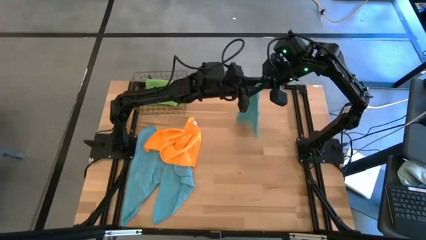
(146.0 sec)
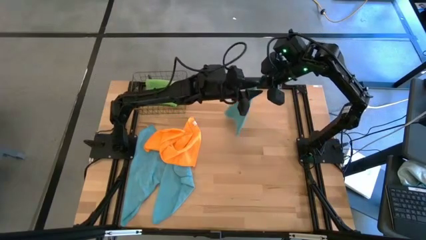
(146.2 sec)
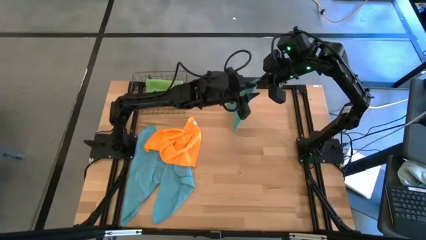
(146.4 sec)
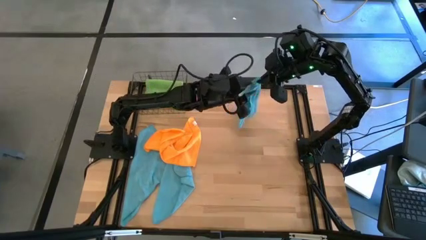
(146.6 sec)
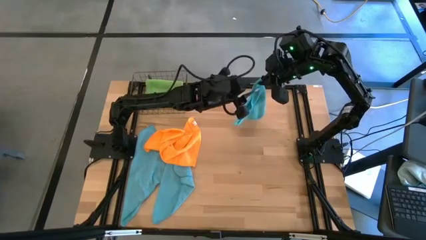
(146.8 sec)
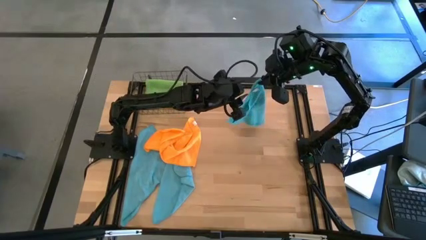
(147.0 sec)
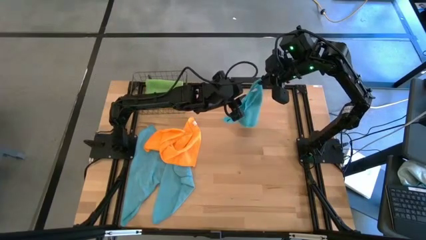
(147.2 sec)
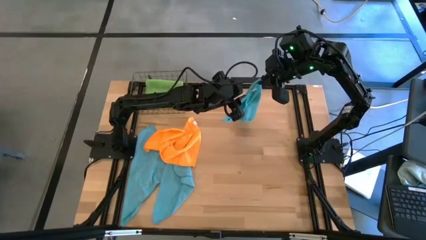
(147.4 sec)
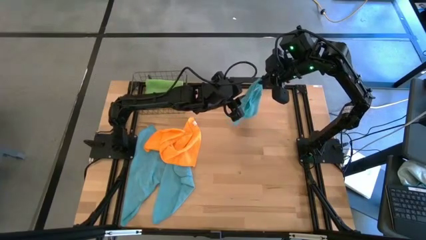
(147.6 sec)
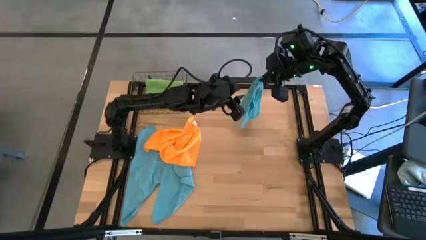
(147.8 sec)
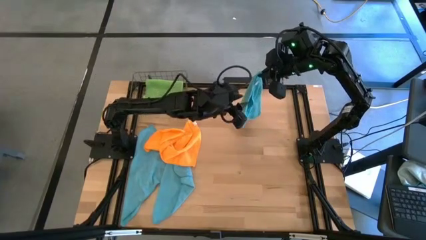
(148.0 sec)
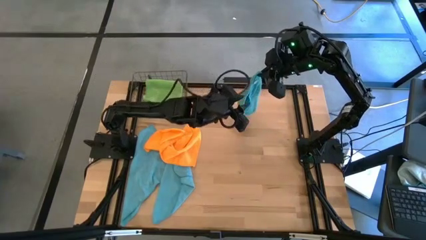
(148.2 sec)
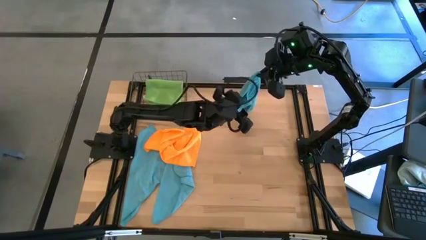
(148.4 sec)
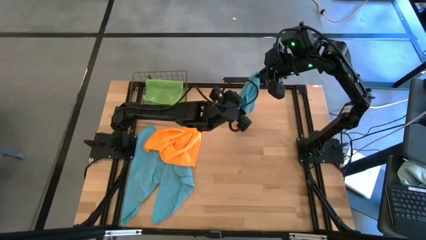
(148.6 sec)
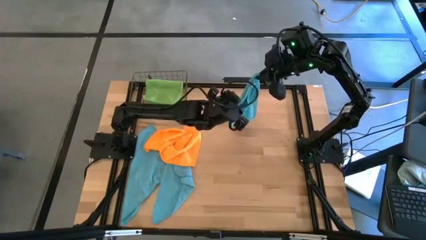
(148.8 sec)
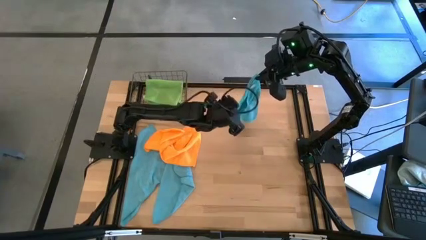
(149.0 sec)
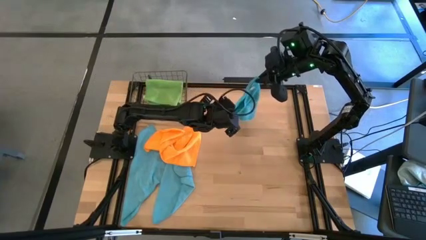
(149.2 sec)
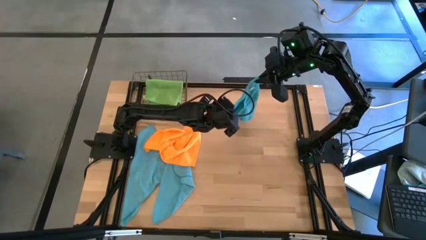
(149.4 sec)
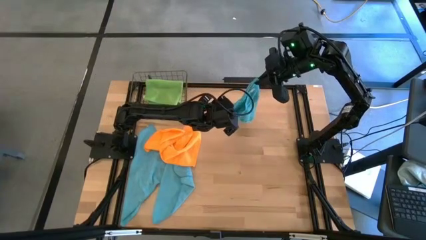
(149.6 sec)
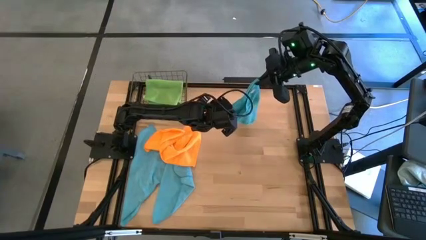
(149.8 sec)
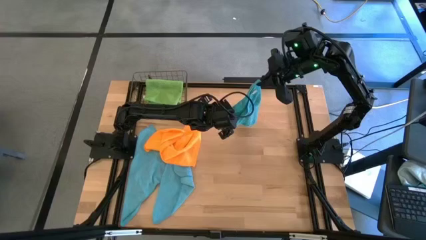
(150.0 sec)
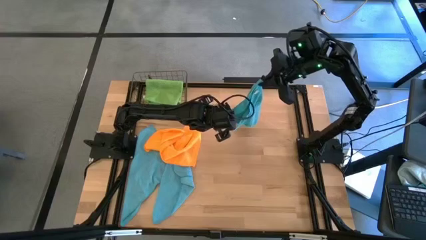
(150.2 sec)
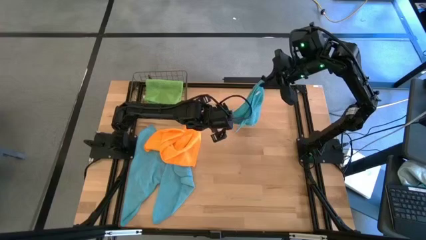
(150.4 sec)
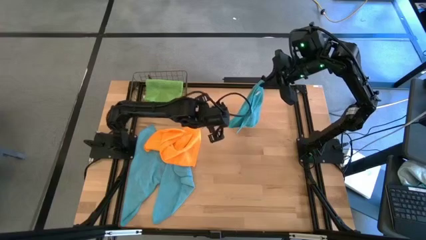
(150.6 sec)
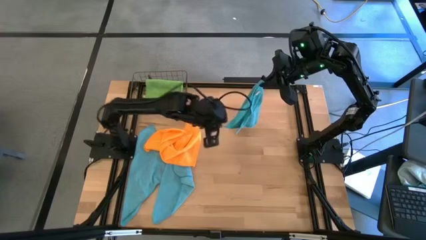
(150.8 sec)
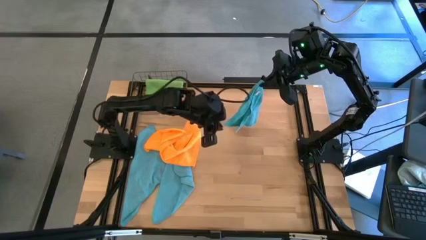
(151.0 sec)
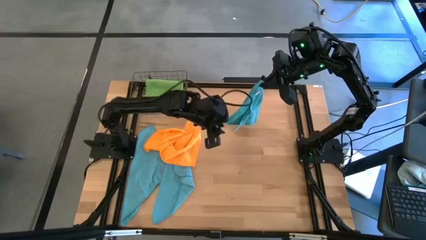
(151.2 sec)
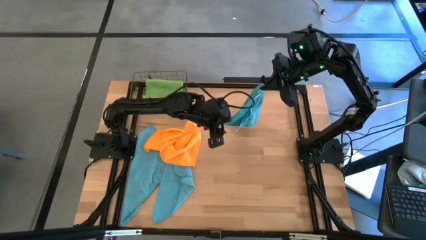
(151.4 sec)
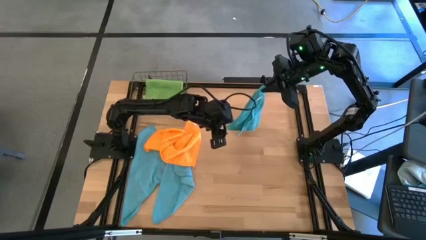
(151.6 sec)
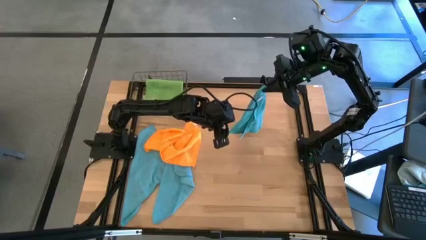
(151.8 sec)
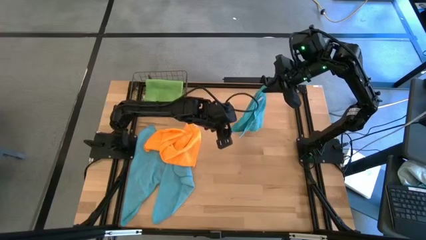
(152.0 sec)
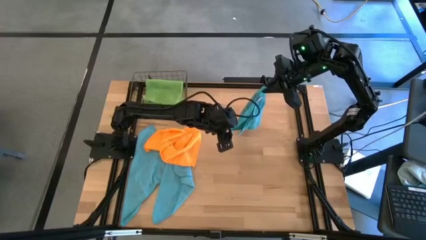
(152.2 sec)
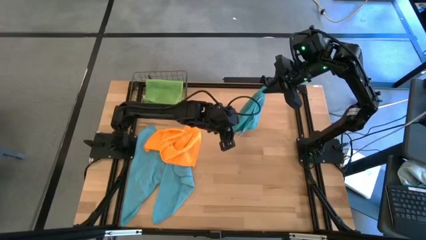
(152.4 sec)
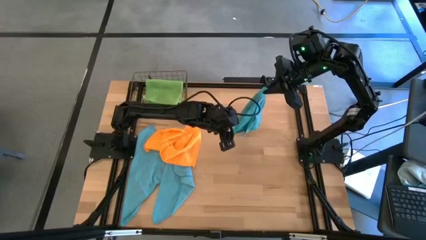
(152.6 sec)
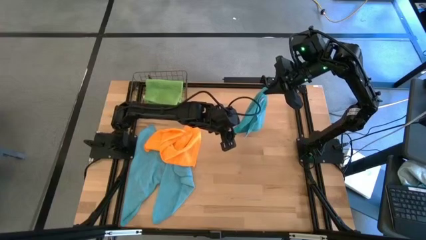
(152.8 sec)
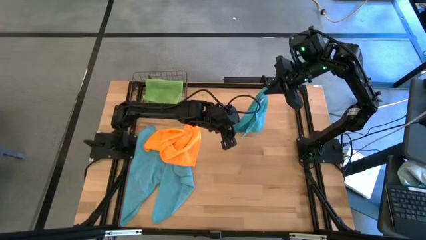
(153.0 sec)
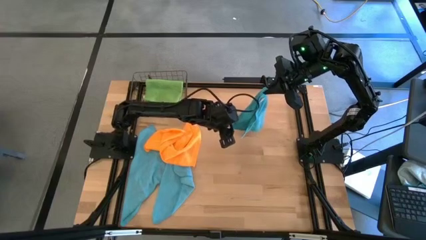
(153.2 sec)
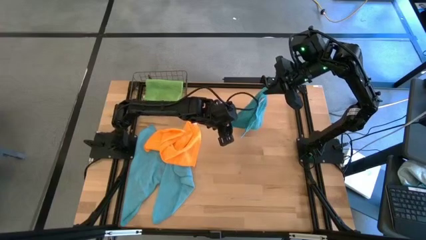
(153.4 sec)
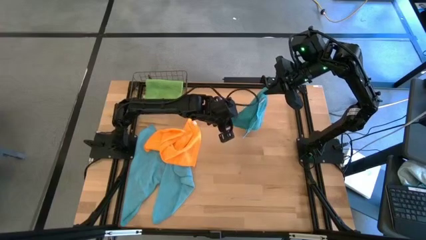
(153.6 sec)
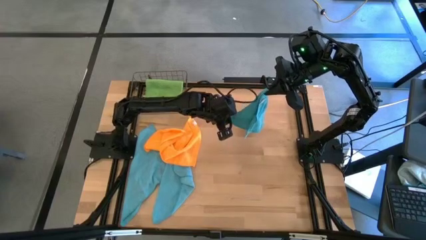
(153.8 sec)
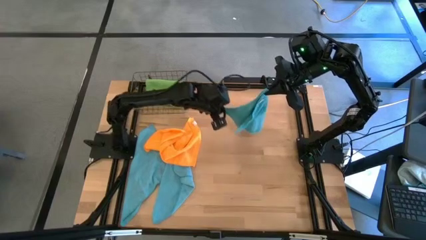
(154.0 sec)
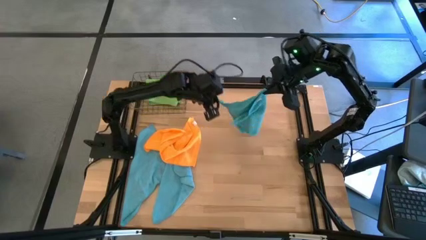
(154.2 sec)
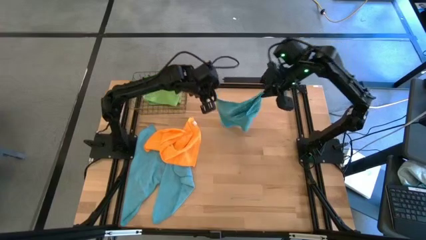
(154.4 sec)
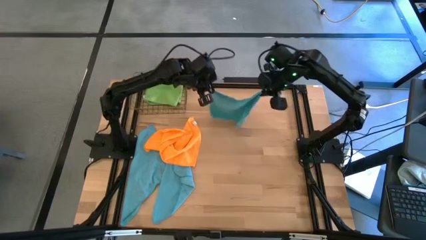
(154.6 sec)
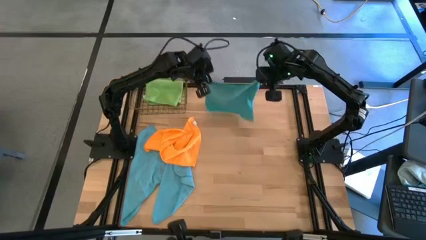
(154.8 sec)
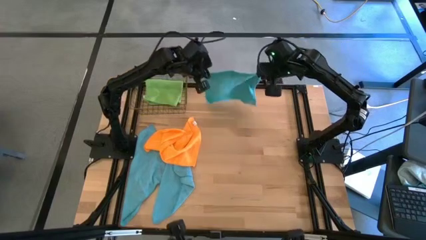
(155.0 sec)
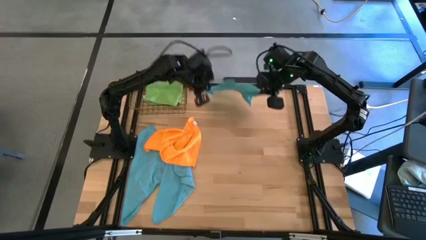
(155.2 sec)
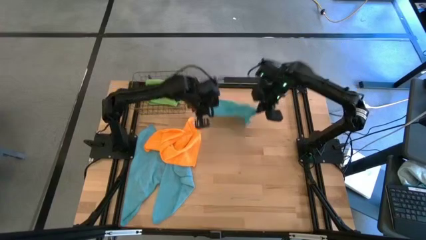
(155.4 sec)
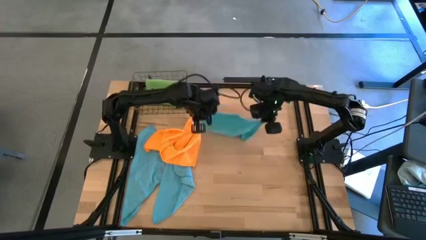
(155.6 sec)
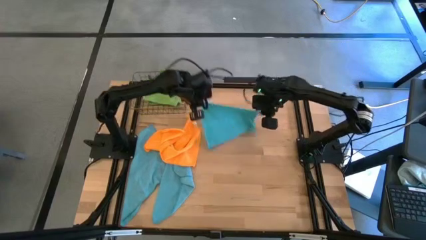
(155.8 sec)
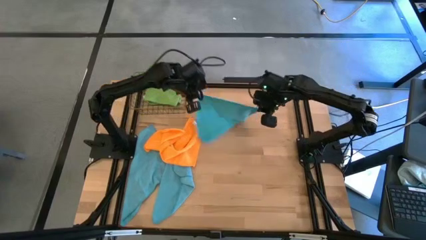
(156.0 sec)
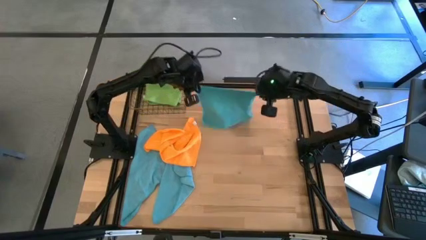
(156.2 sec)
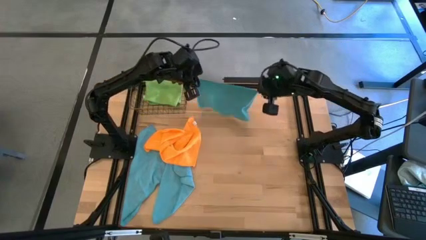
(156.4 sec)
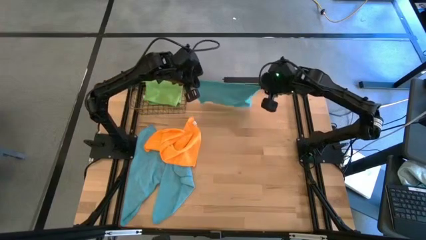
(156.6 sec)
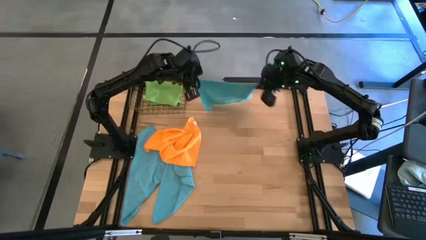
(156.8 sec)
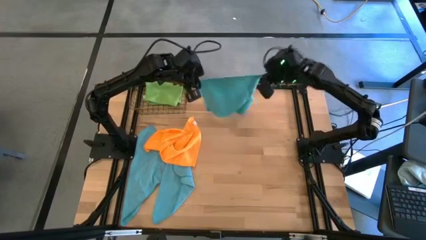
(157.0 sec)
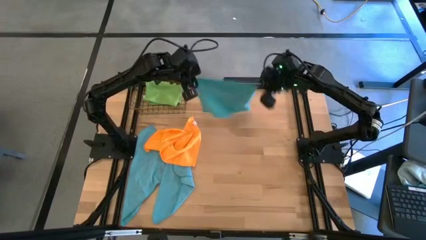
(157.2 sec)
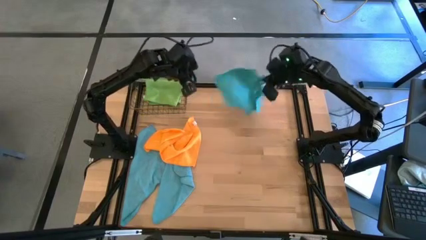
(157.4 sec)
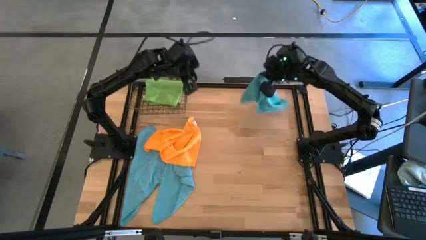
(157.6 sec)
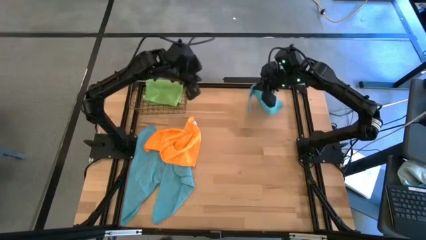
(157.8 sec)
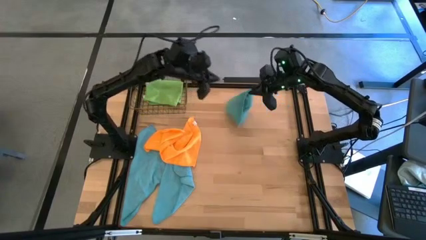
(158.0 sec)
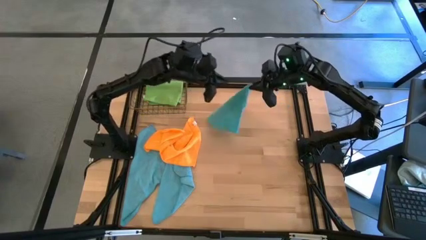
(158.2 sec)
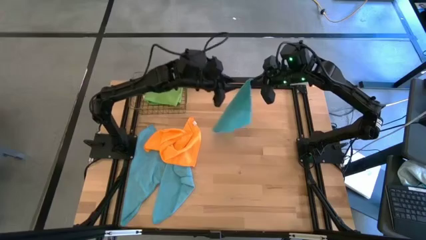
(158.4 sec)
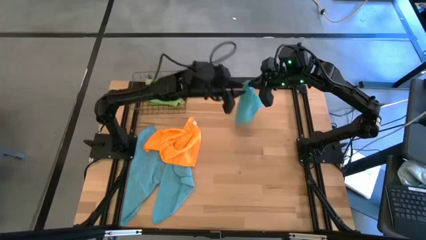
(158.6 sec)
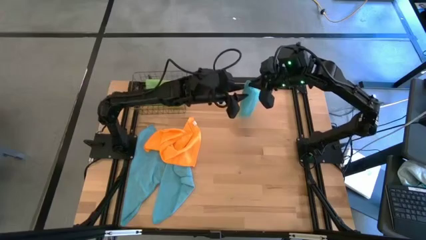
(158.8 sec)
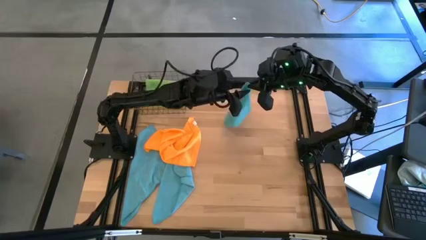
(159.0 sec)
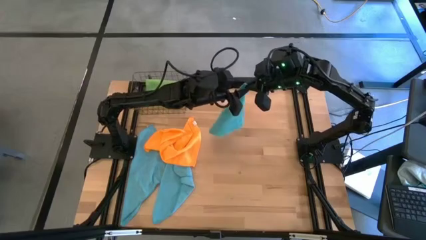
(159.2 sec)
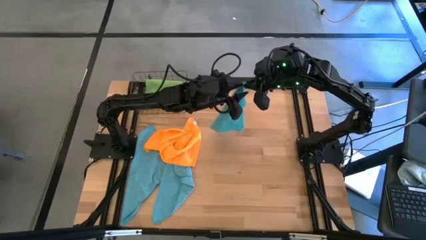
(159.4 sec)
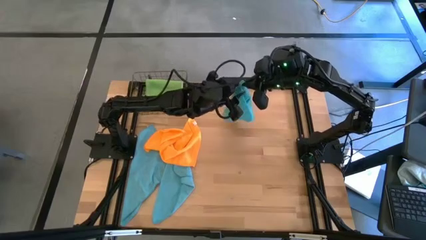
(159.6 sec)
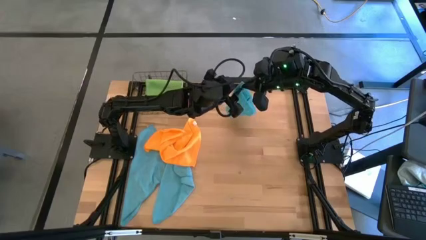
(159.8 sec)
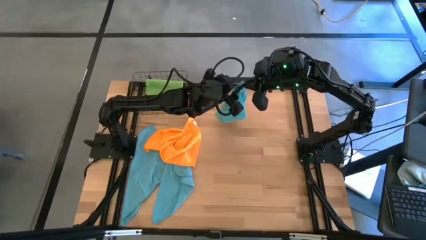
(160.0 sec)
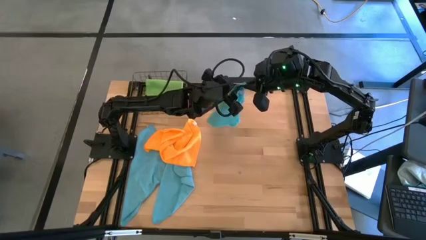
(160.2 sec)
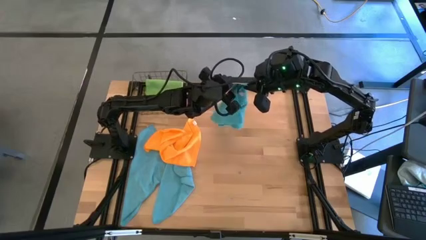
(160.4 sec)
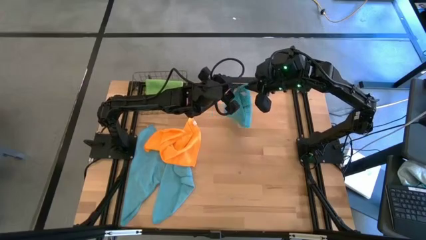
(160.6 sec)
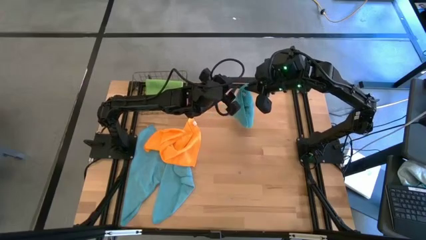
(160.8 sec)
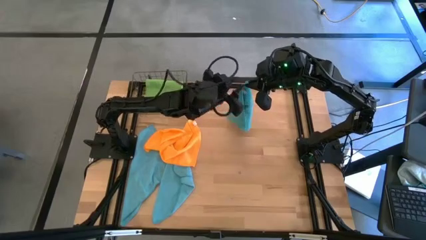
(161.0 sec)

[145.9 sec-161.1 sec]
Task: Fold microfiber towels
Fold the blue microfiber cloth

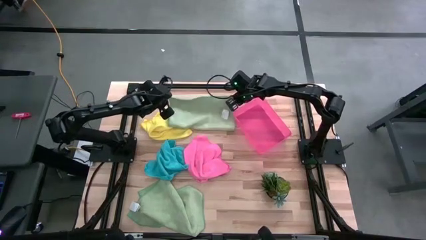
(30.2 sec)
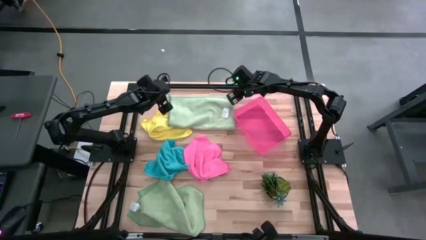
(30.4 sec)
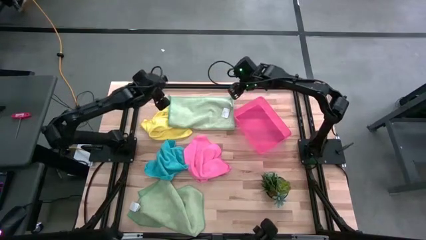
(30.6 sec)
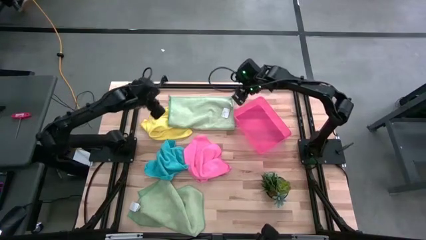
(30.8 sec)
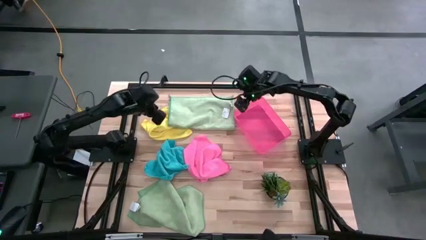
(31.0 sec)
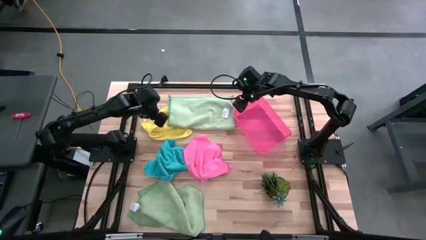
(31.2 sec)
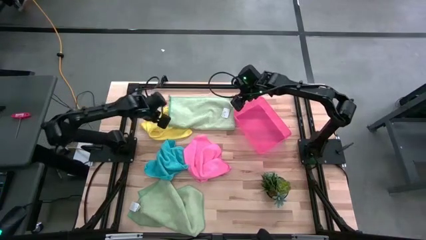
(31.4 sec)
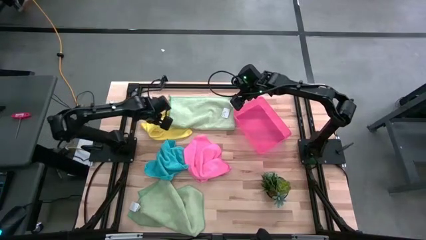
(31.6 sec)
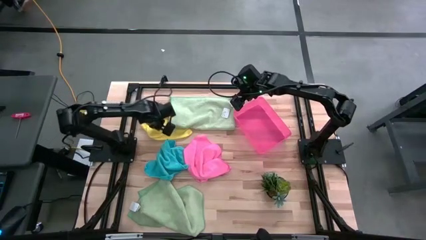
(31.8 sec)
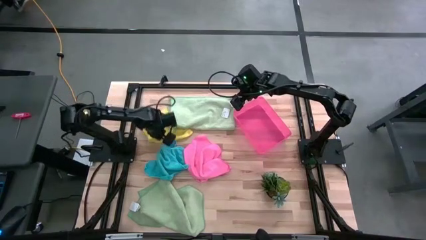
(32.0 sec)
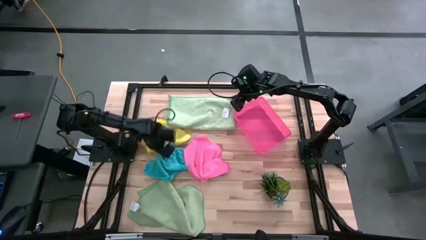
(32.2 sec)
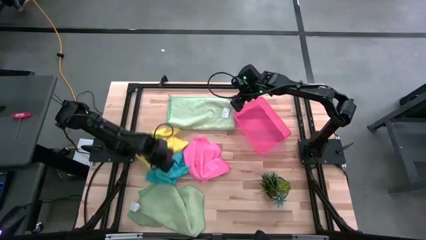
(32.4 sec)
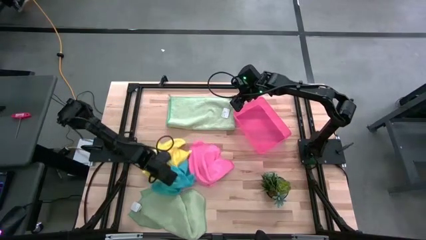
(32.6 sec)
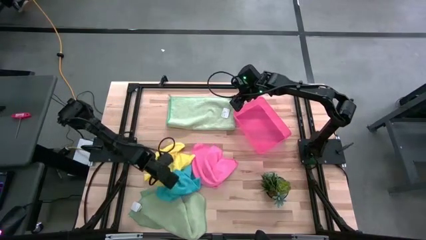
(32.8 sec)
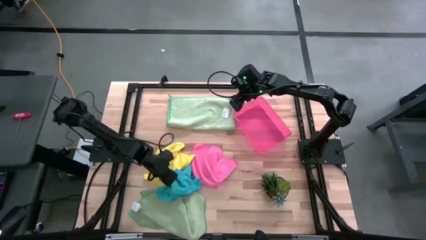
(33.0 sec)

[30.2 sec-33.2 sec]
Task: Fold microfiber towels
Adjust the microfiber cloths on the table
